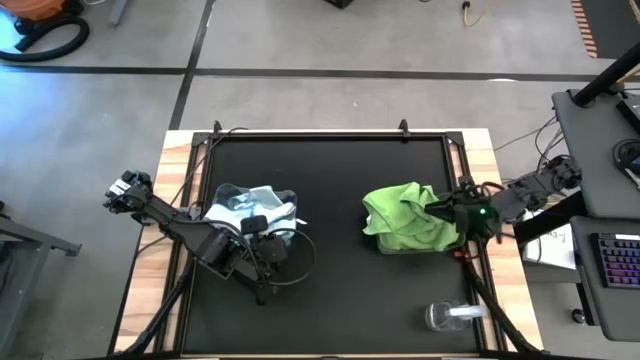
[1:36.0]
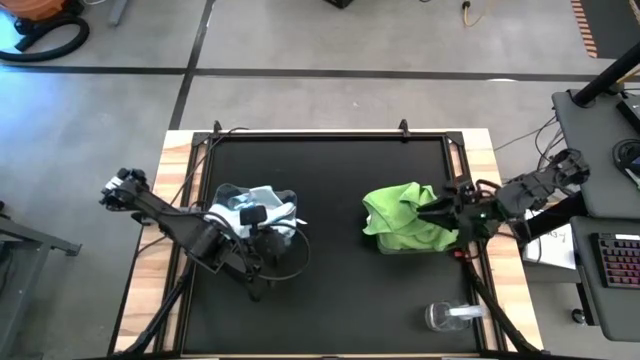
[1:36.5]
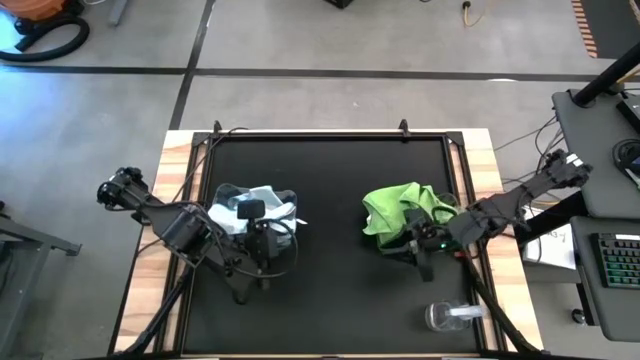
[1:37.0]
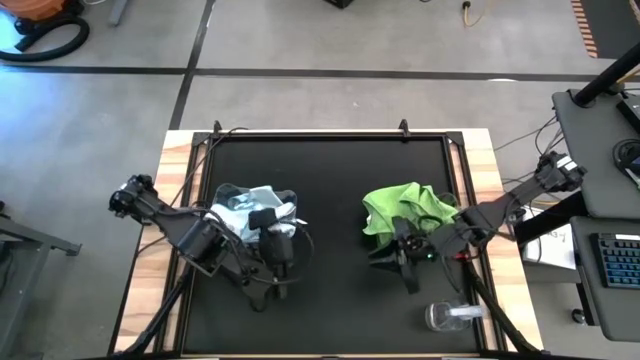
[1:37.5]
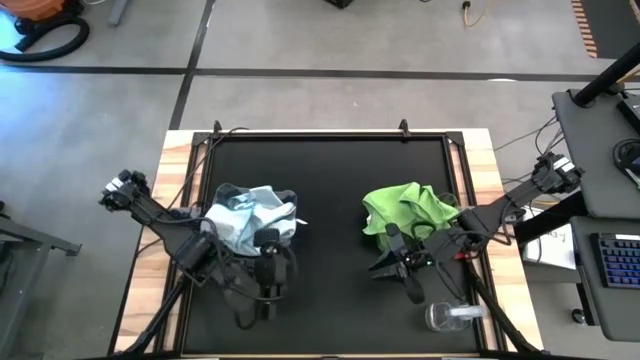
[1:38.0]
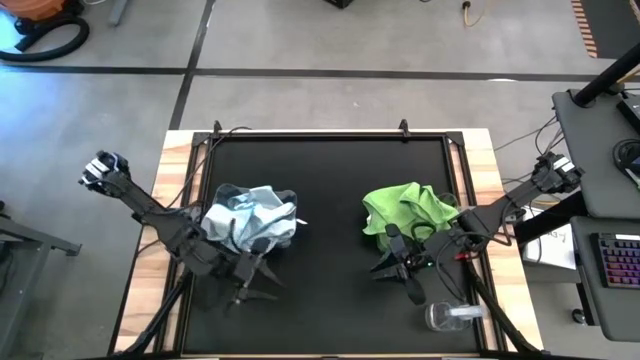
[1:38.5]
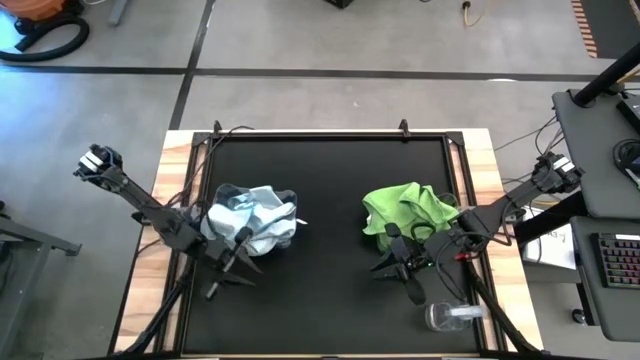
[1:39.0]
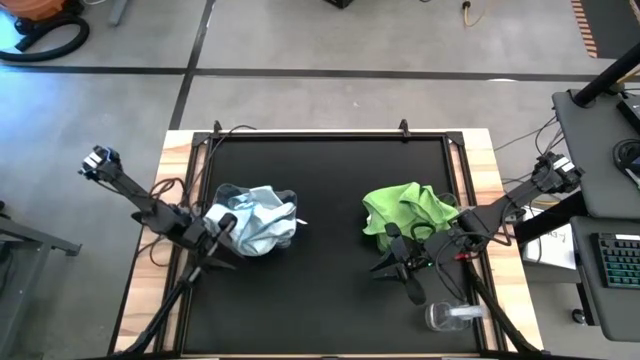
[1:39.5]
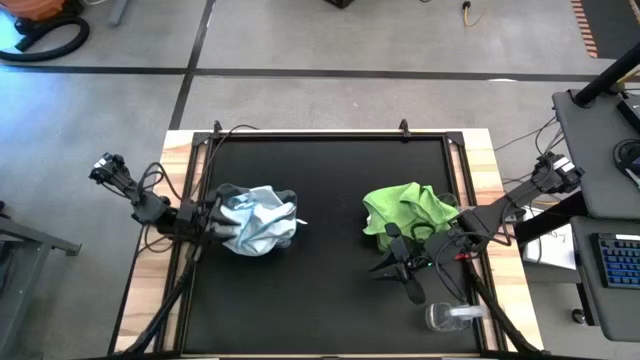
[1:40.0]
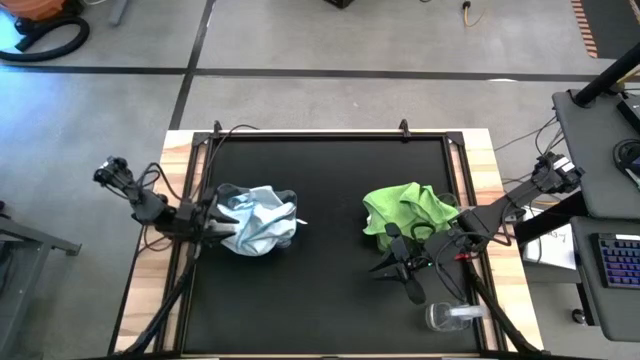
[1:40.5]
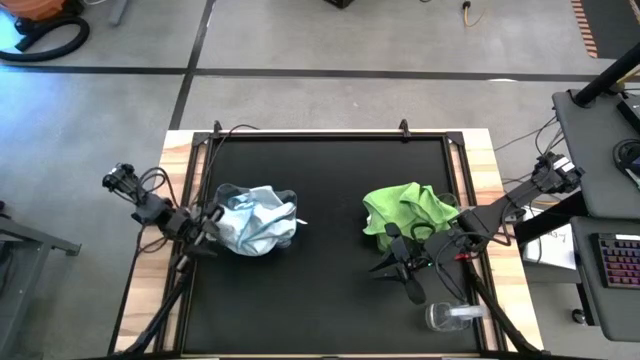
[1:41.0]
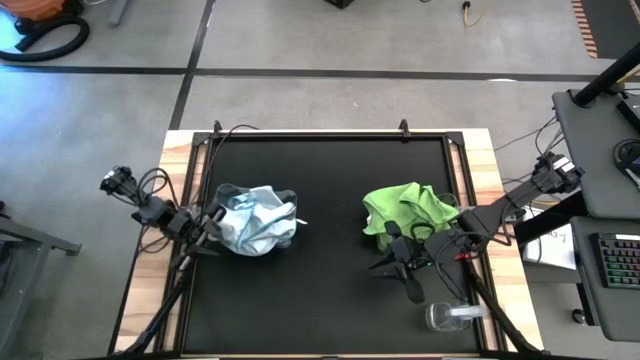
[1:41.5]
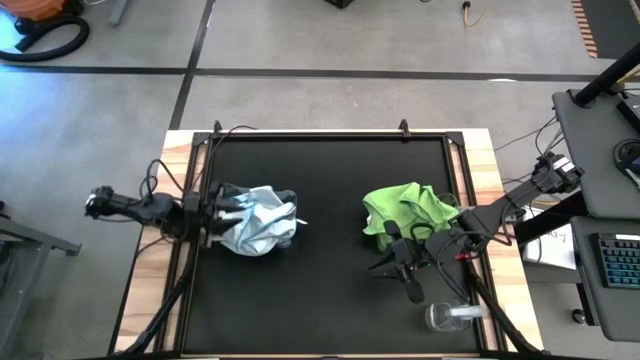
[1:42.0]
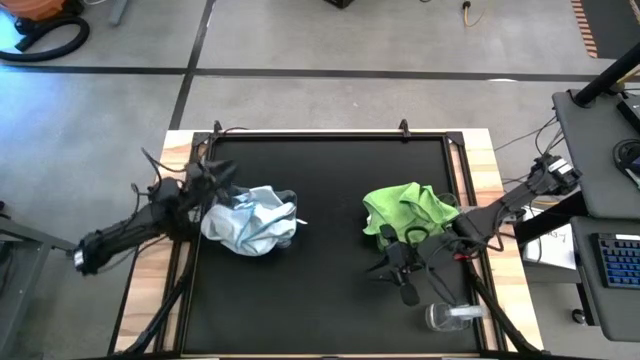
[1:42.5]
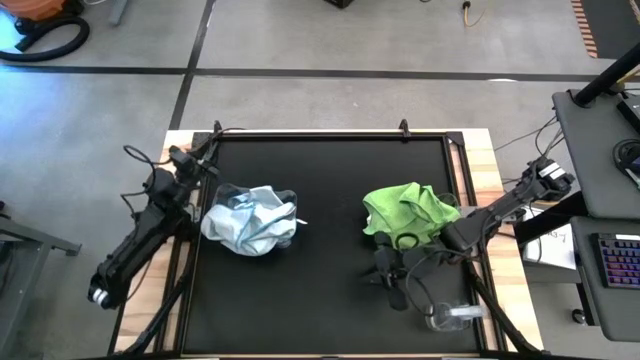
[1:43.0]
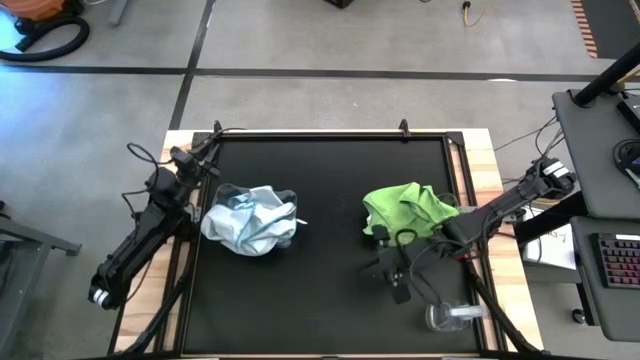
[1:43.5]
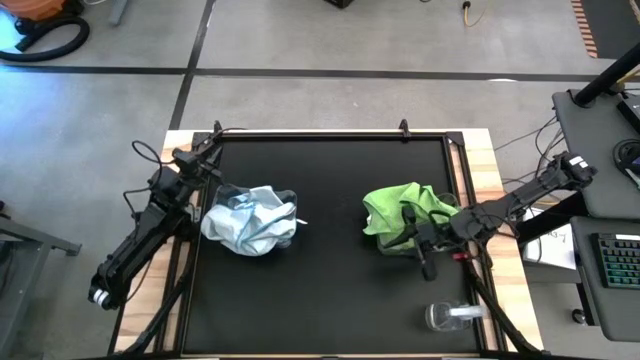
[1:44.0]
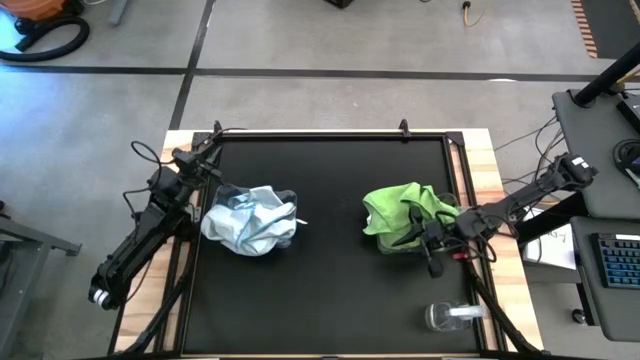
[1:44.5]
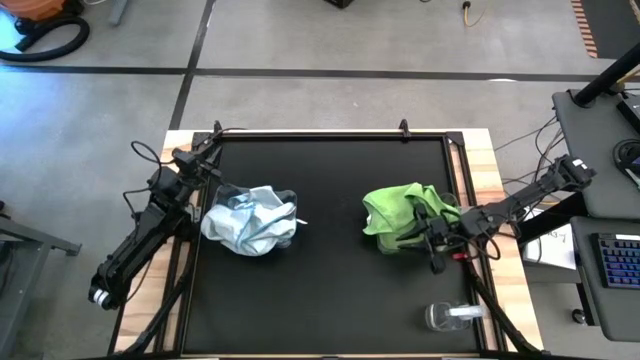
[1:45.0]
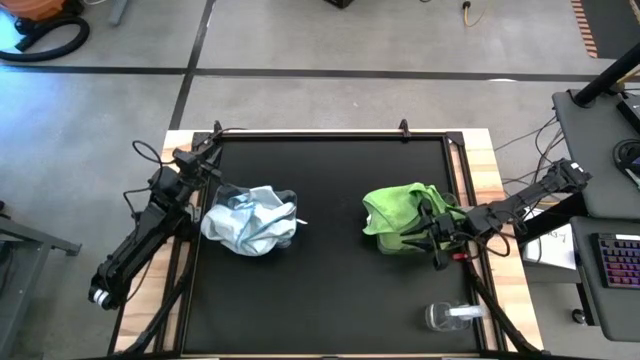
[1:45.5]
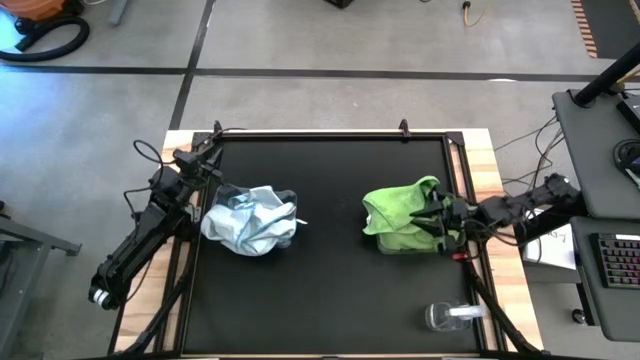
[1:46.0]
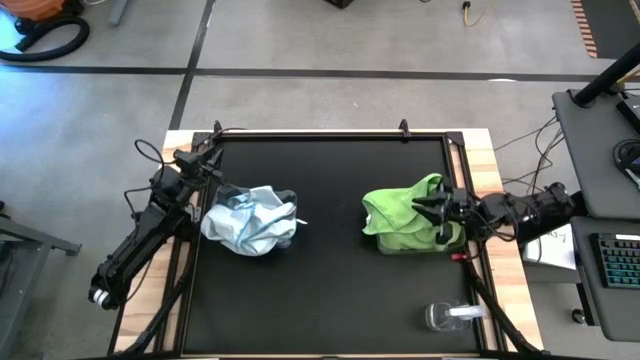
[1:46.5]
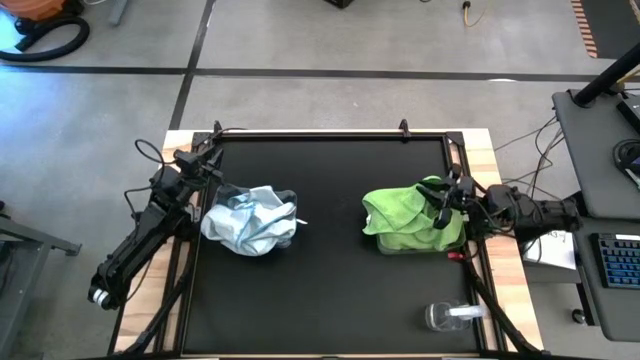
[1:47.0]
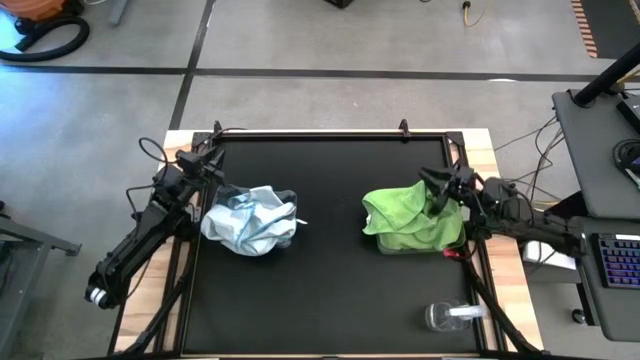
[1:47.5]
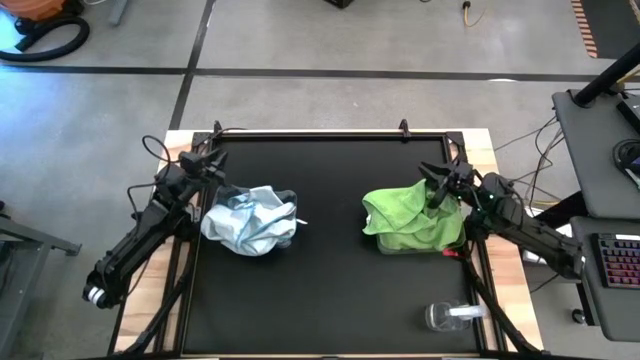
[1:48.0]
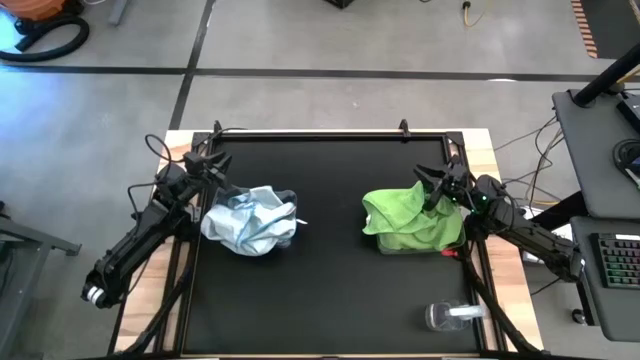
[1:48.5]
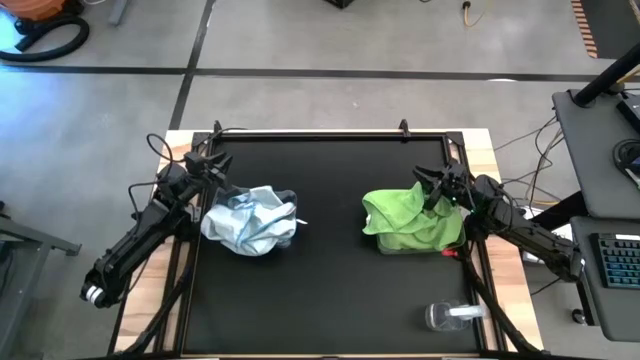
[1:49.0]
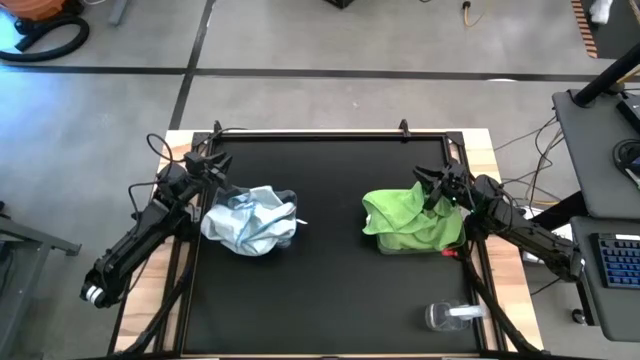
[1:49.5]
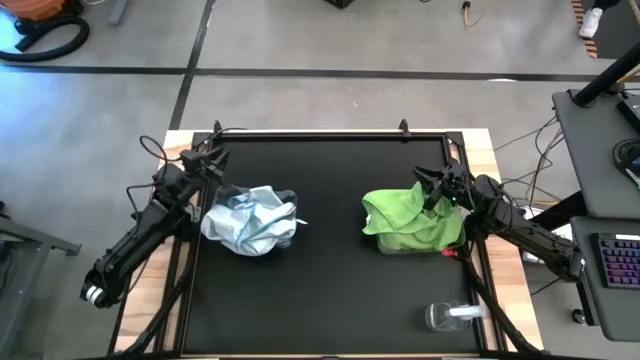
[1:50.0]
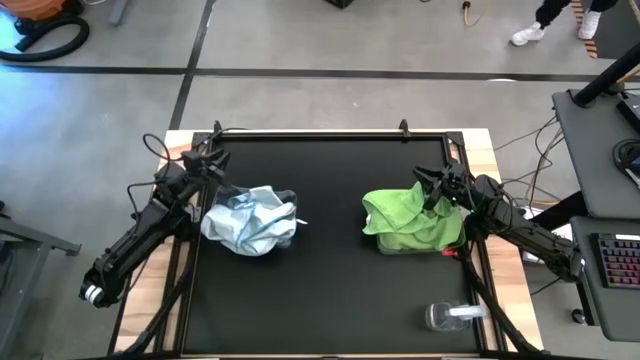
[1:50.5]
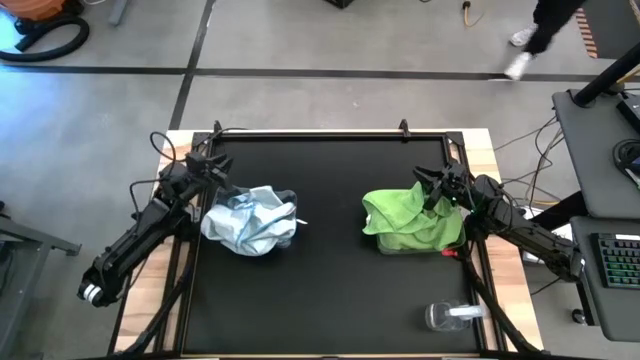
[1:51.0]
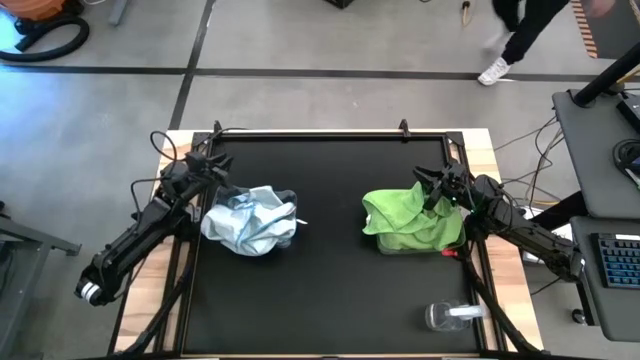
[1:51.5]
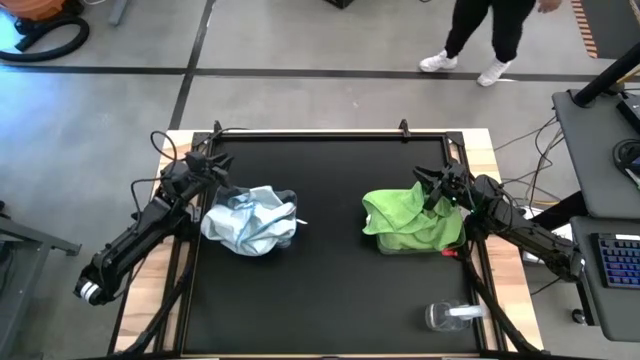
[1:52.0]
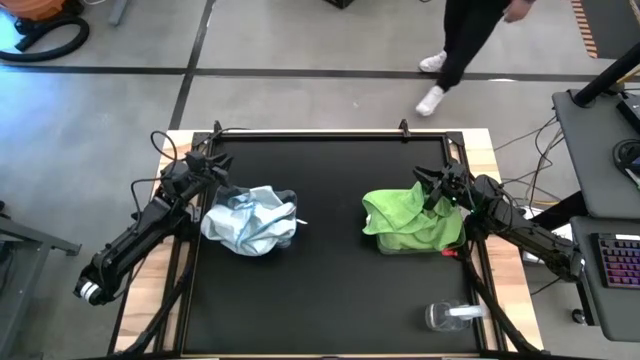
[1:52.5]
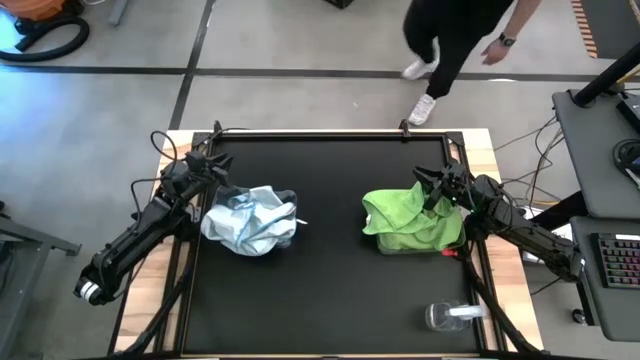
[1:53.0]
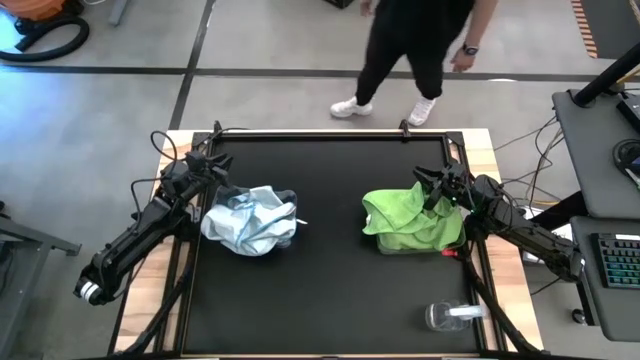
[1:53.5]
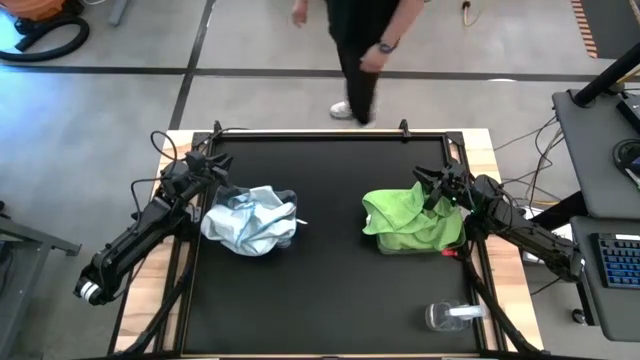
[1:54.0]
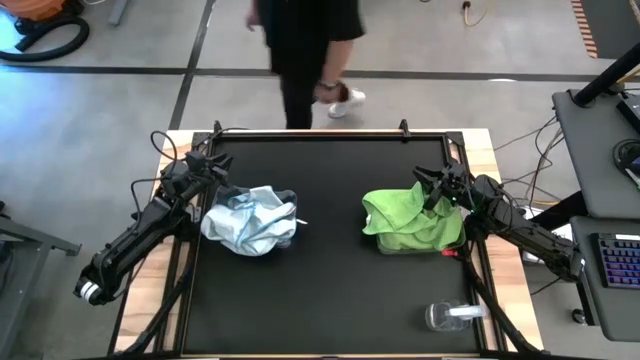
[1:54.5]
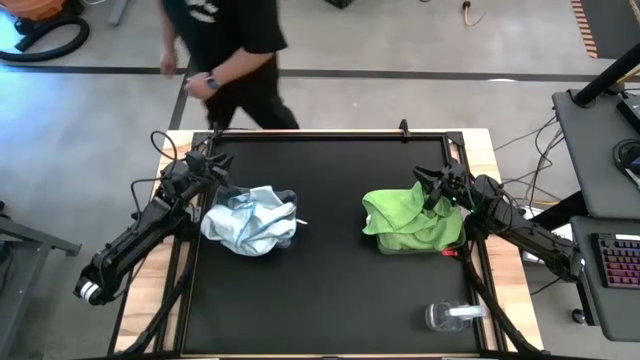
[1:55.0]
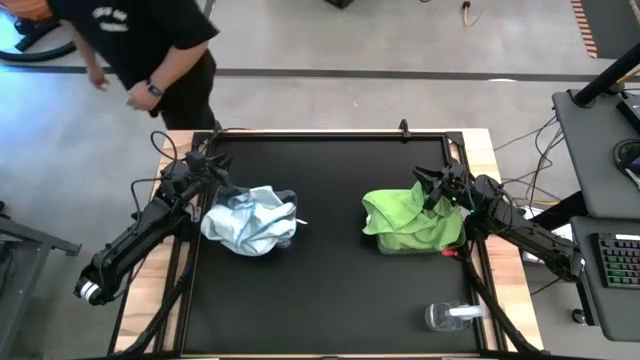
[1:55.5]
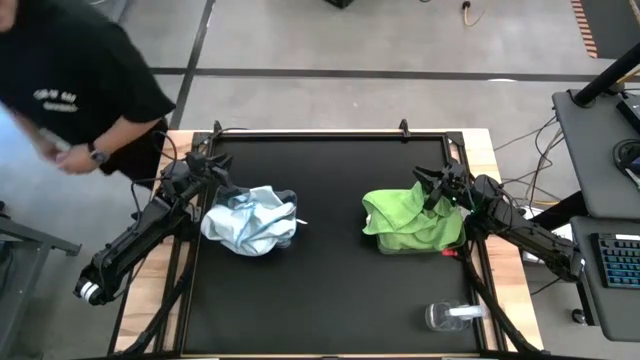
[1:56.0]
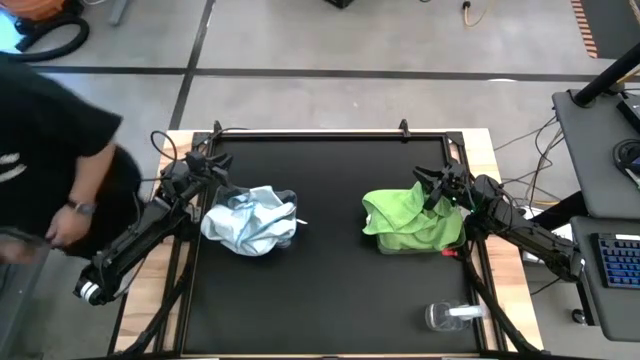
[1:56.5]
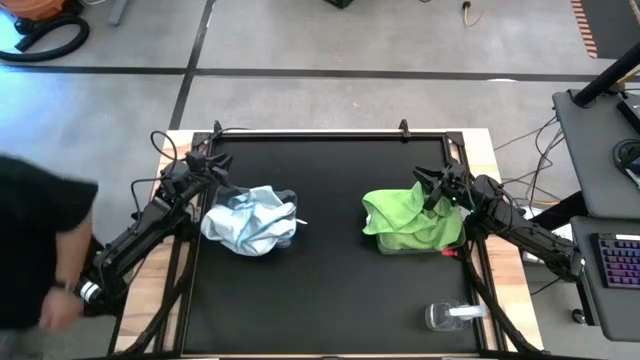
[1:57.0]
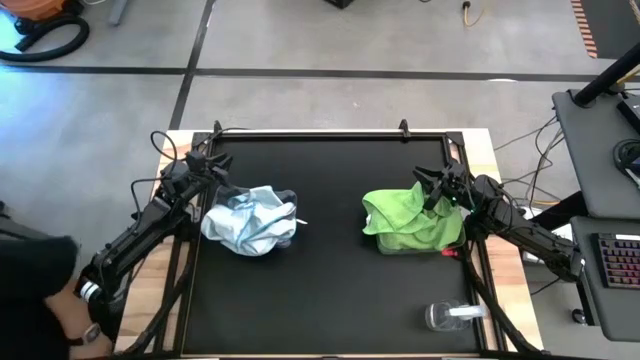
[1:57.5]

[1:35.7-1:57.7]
Task: Sort microfiber towel by color & place in baskets
Return to Home Position
